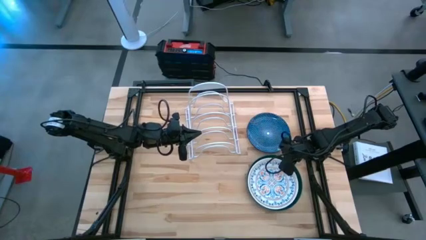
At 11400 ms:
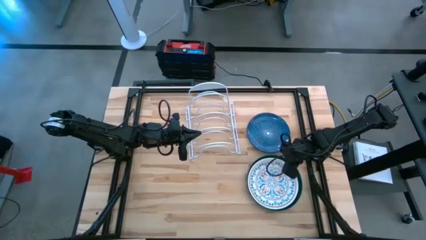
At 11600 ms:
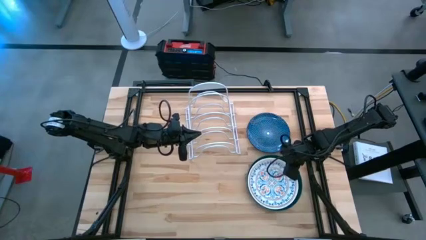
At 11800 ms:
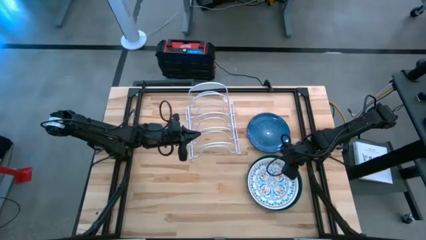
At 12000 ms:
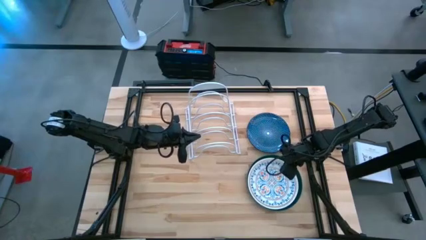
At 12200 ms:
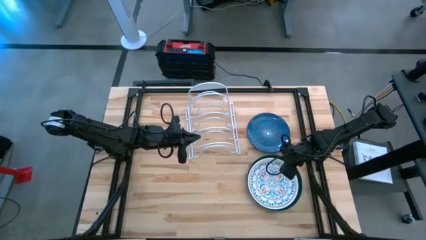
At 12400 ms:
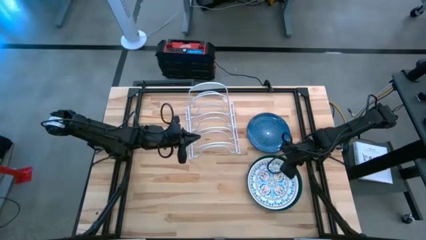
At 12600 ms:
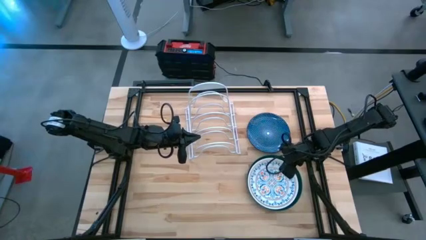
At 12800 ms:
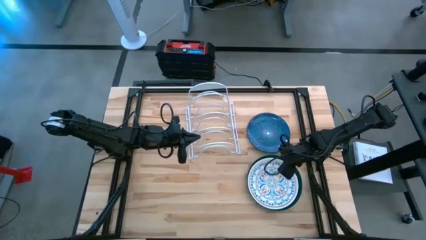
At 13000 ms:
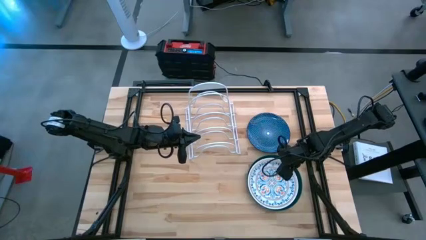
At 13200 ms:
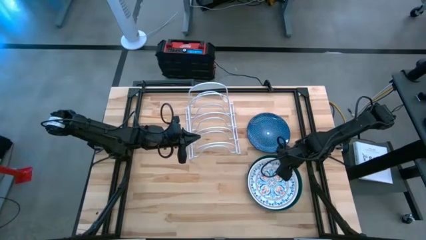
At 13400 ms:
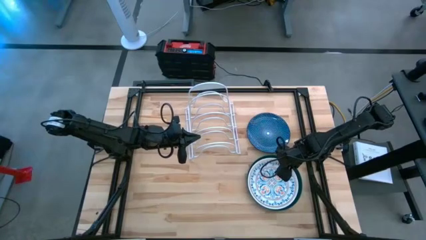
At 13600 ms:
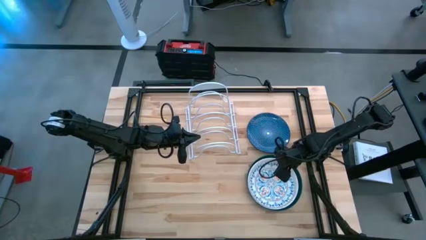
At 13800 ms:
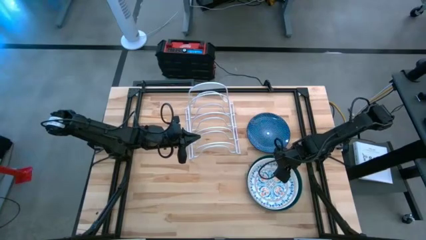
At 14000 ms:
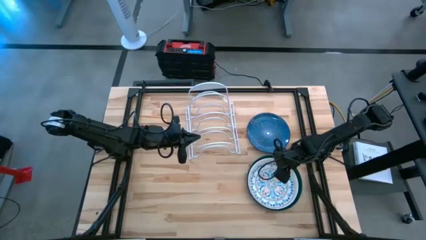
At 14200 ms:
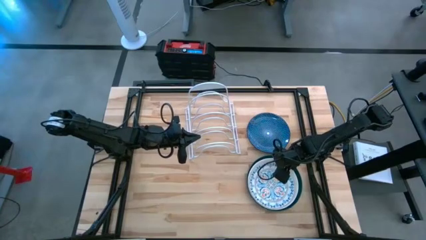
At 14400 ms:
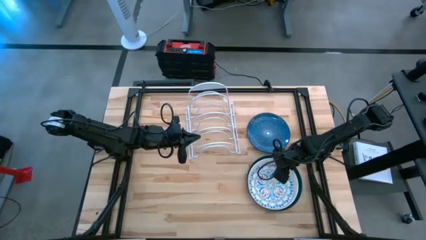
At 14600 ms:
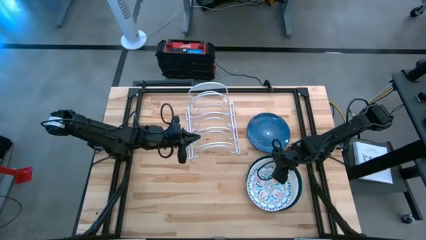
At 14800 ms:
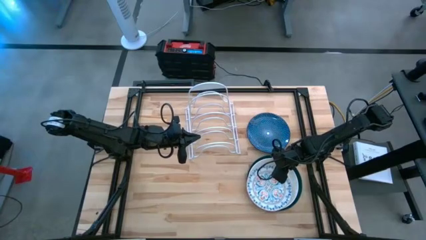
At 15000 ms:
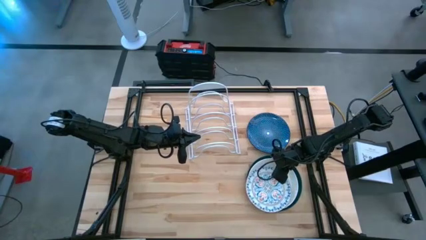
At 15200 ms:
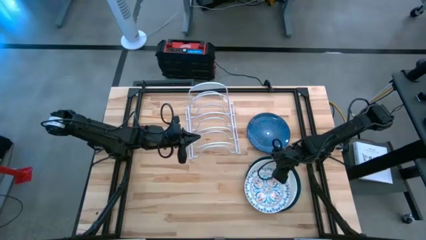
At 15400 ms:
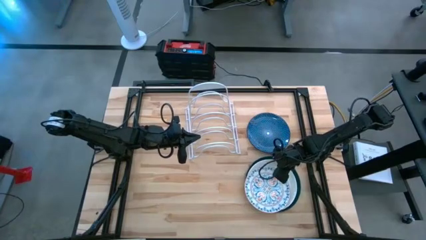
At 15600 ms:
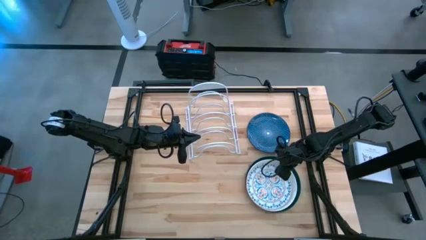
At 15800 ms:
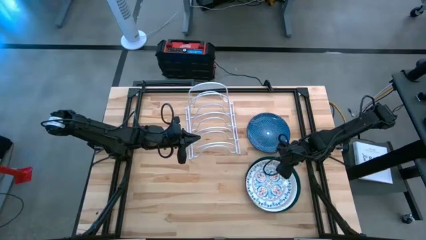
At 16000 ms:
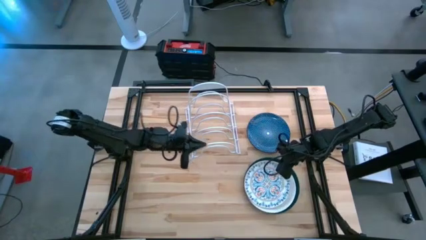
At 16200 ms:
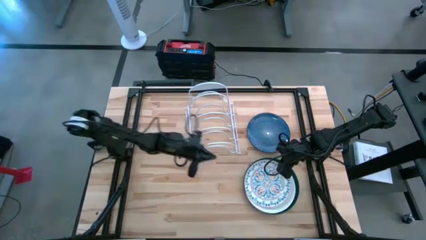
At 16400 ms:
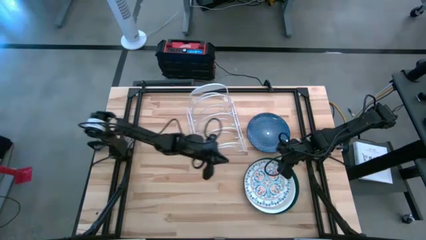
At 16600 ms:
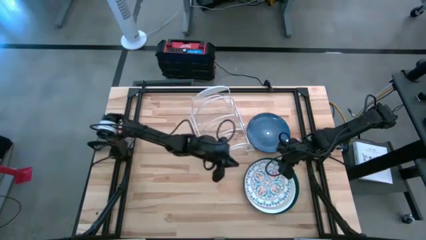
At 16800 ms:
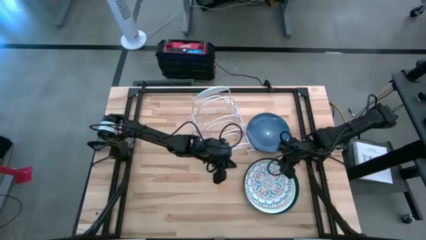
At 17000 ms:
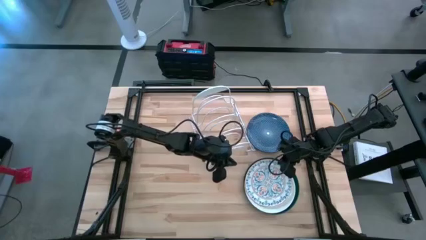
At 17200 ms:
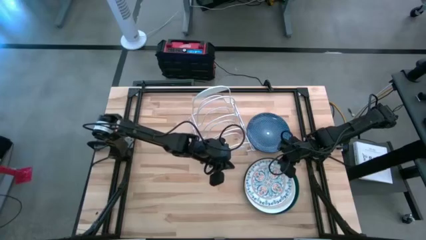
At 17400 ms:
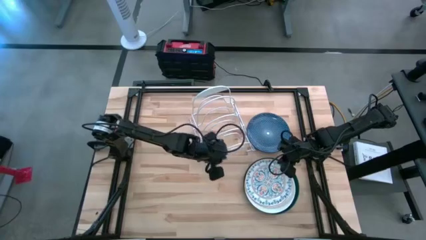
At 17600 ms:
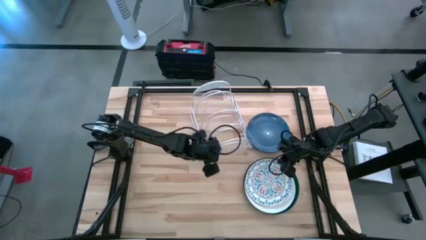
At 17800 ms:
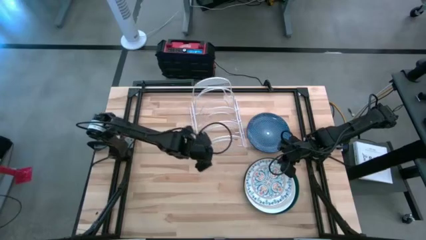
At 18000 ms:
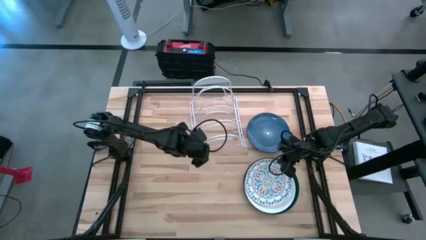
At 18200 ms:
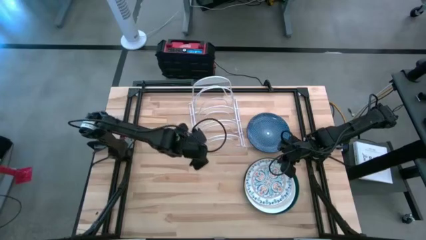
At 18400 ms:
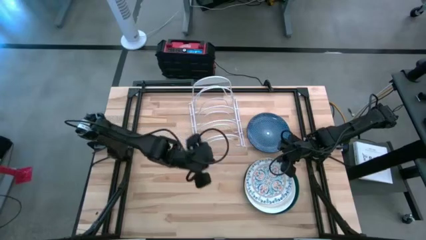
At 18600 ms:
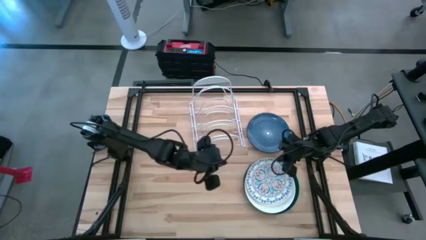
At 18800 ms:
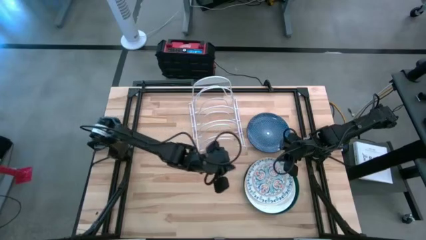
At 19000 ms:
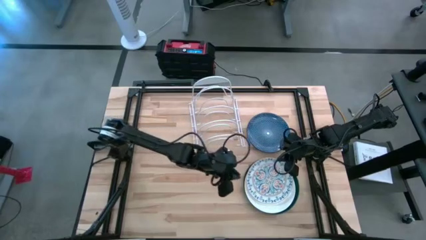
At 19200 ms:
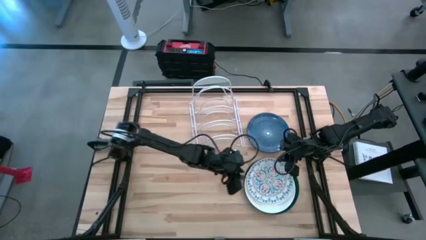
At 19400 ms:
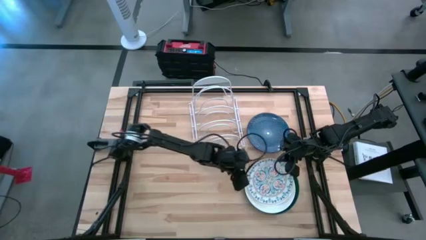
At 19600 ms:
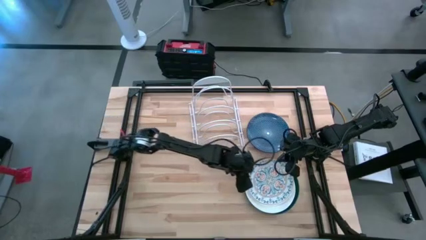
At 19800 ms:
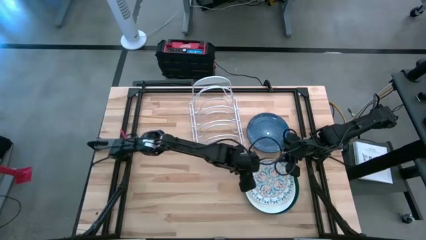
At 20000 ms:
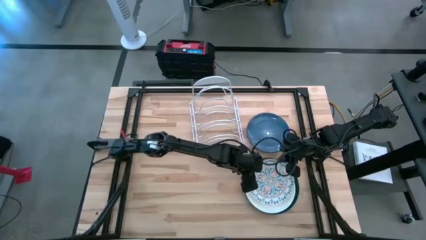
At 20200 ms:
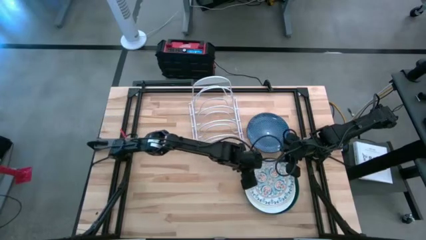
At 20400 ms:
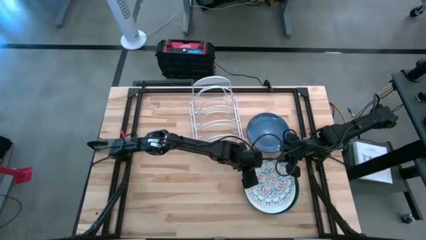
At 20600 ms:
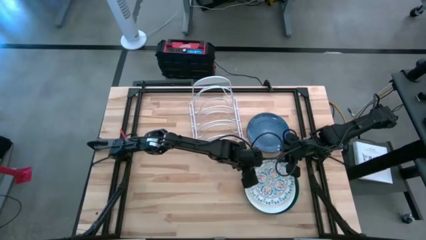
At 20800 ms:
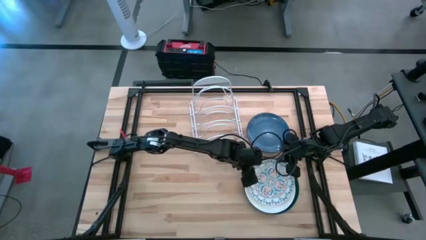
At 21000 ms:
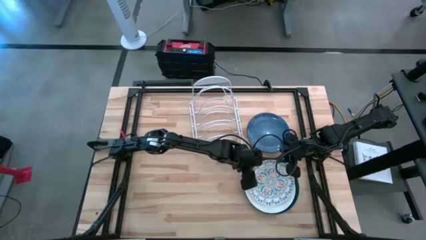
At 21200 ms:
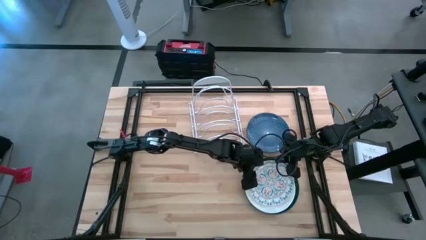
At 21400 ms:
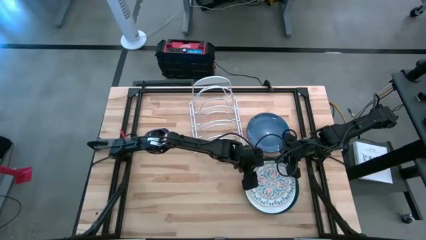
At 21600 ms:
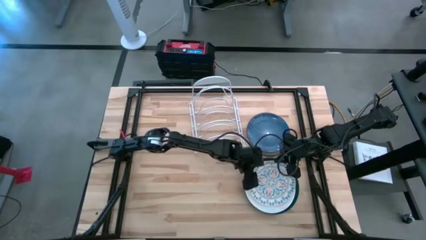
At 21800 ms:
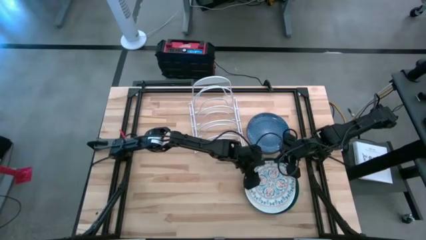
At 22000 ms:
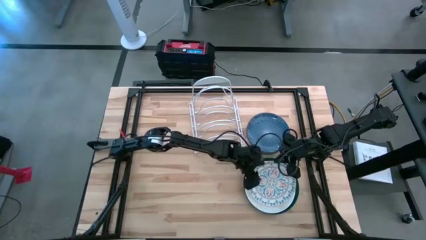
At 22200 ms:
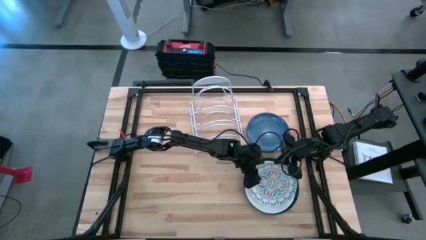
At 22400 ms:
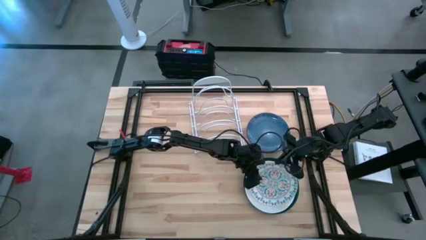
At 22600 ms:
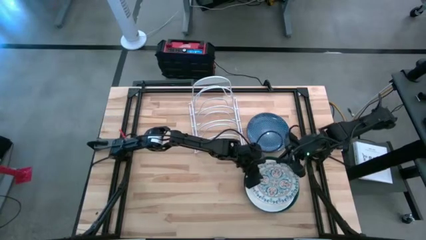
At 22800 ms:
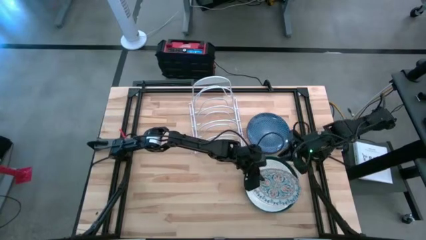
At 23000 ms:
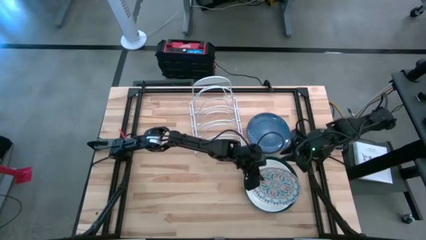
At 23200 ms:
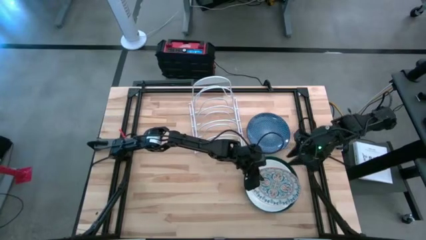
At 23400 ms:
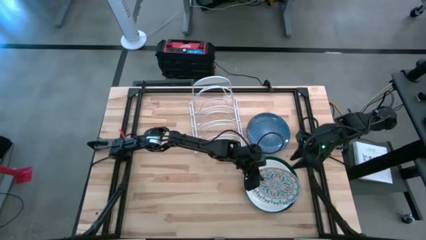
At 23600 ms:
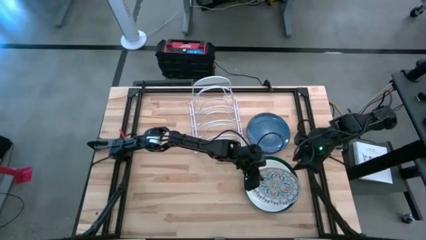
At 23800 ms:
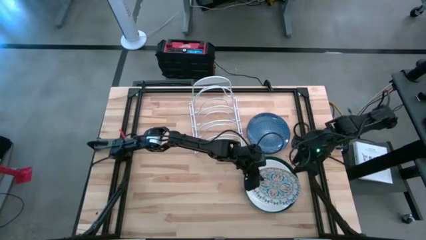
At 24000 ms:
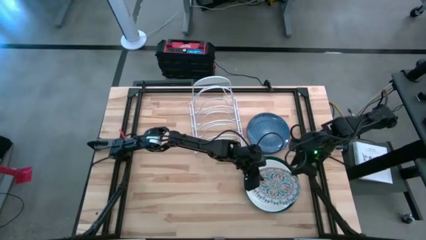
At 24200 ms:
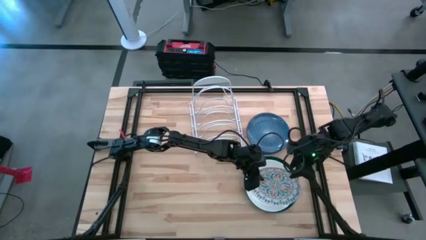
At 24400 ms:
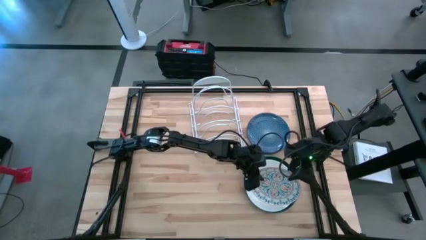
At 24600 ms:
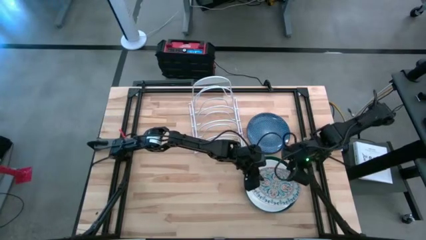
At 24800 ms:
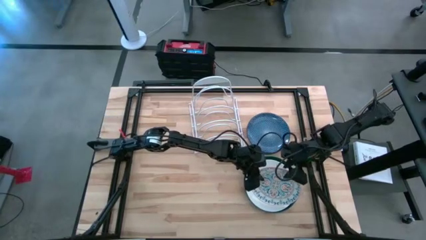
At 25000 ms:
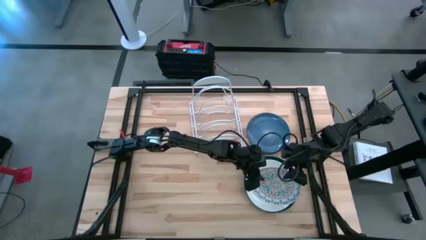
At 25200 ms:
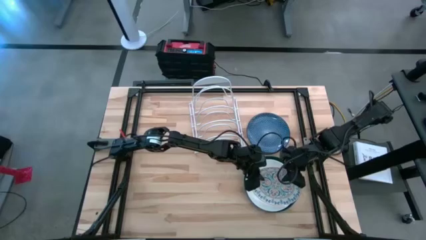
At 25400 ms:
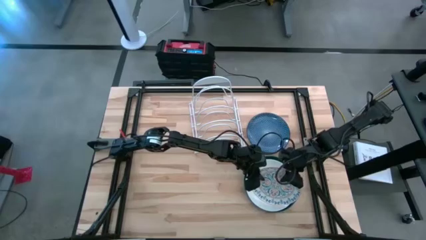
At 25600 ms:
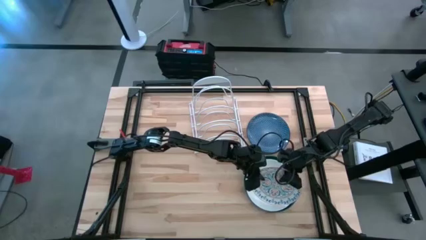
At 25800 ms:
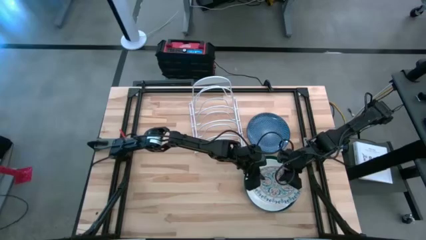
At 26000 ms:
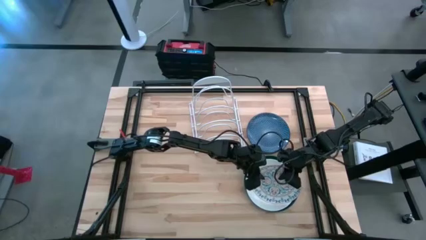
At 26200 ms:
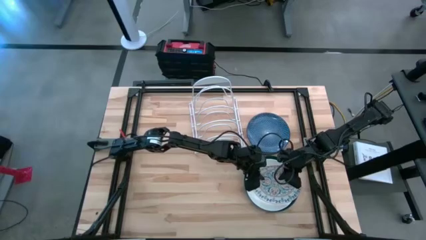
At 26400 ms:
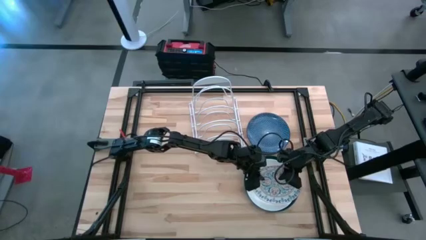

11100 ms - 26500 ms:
Task: Sort dishes
Put the white patterned plate into the dish rack

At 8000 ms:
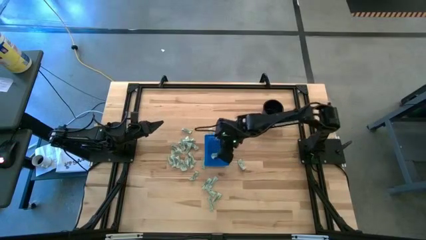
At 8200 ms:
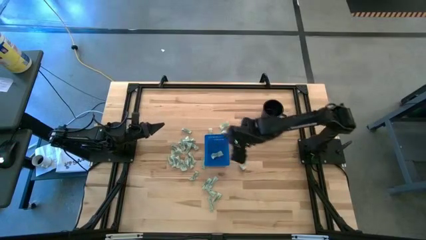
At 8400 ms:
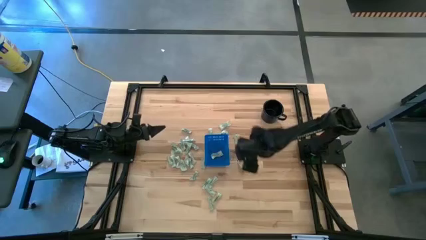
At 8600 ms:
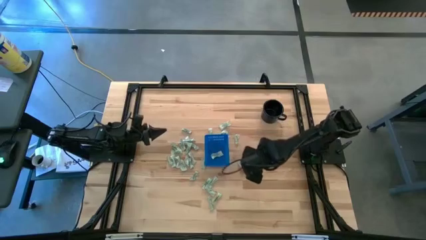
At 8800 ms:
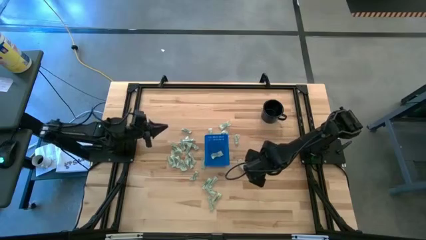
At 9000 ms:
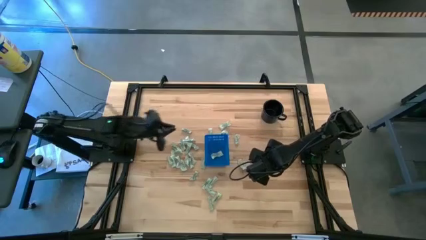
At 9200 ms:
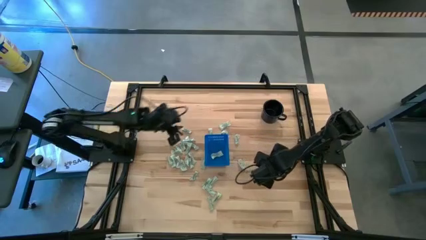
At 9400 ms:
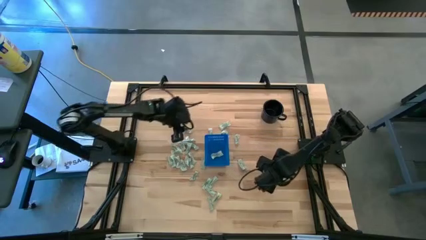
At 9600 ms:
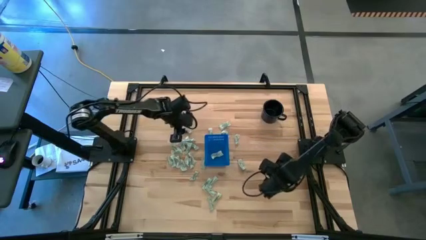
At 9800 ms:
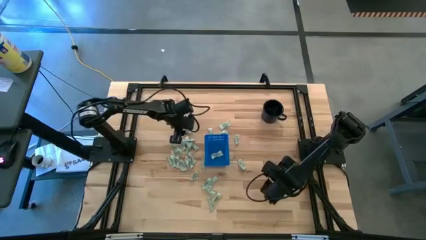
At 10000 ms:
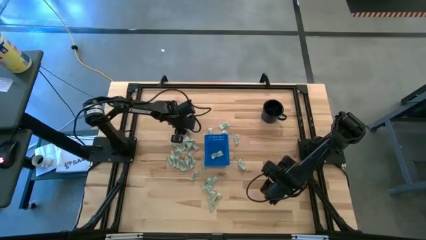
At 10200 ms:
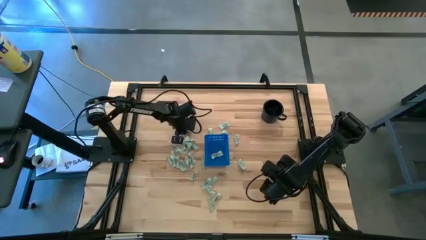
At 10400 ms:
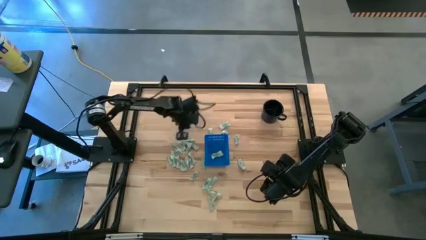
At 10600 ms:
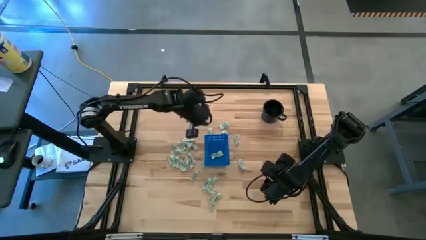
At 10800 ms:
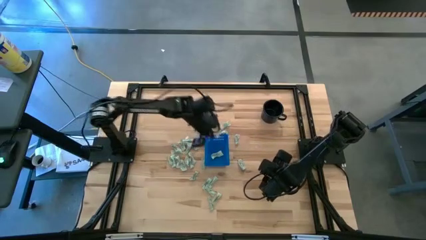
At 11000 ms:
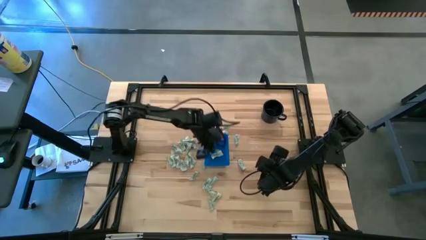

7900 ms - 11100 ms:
Task: Pick and place Stevia / Truvia into bins
Put the stevia packet into the basket
